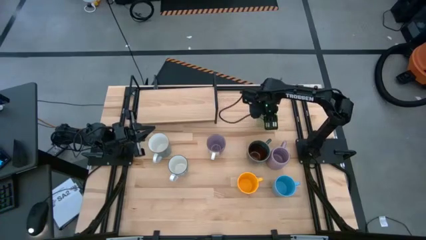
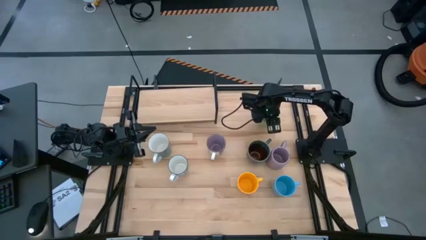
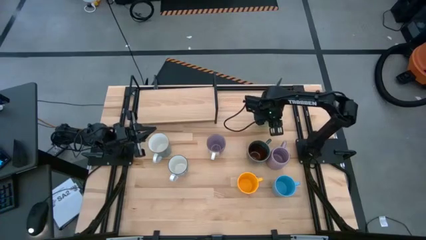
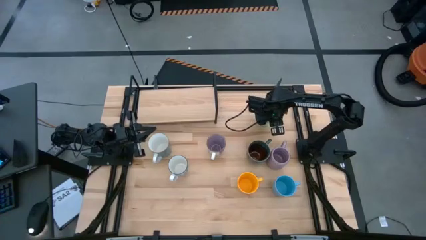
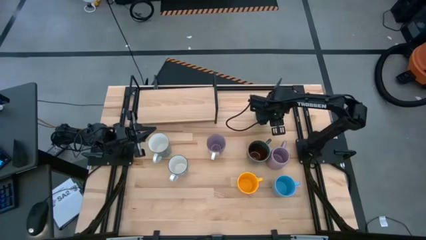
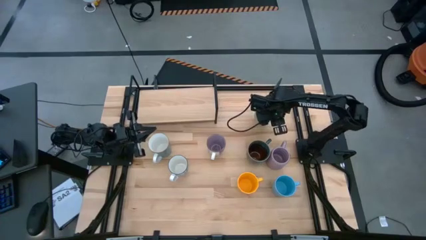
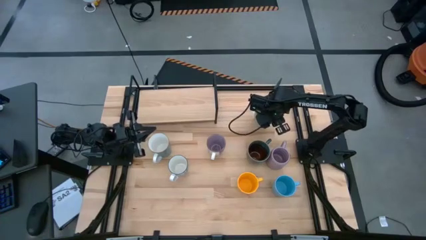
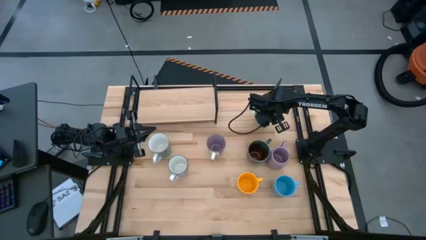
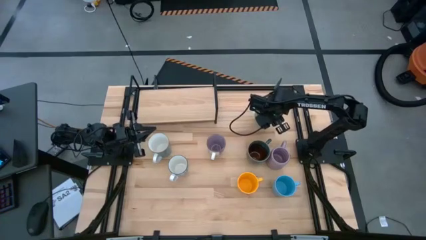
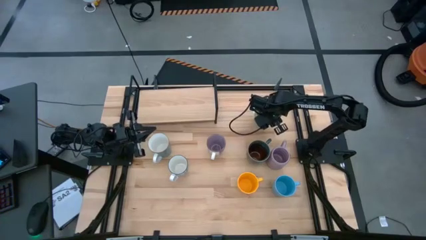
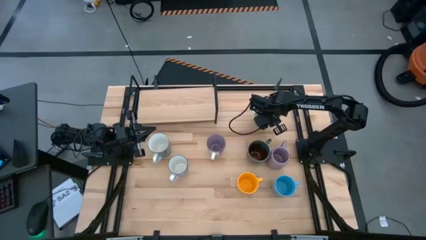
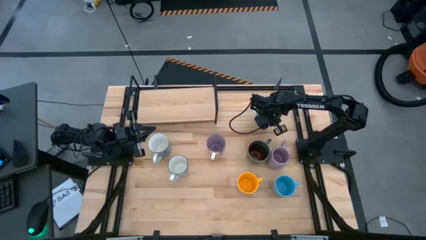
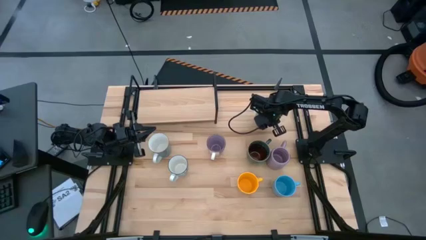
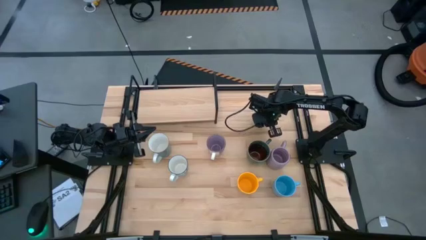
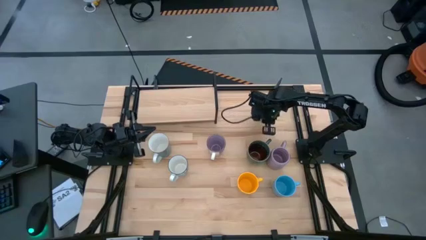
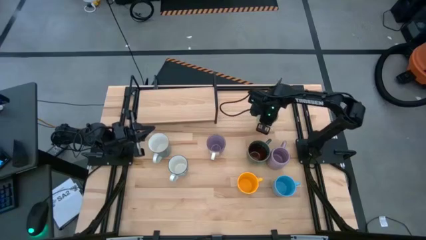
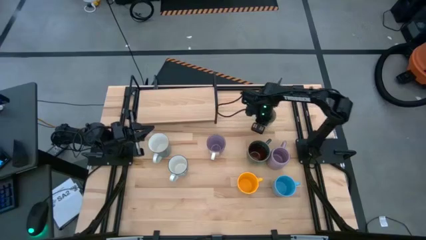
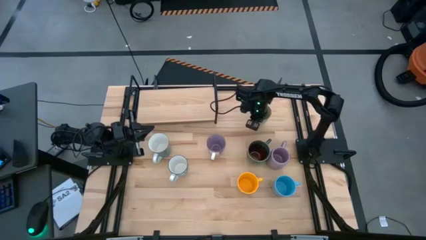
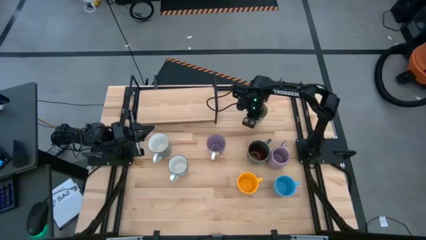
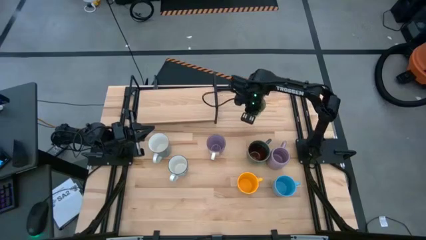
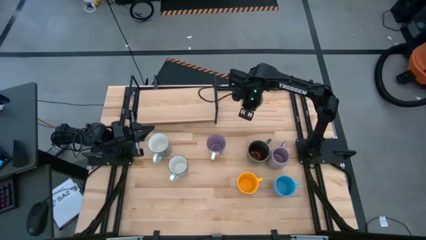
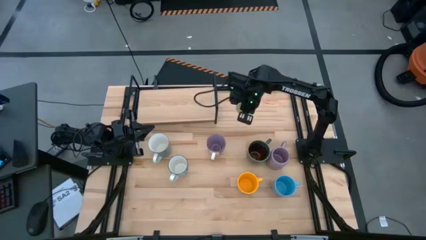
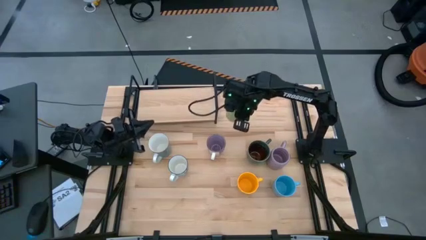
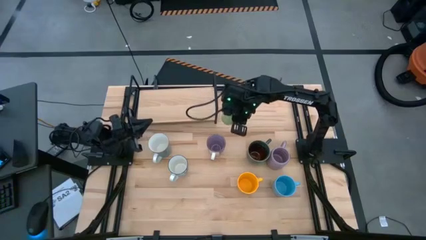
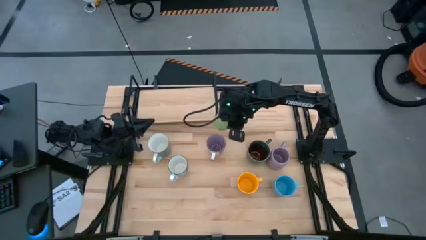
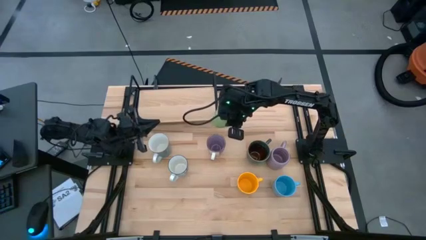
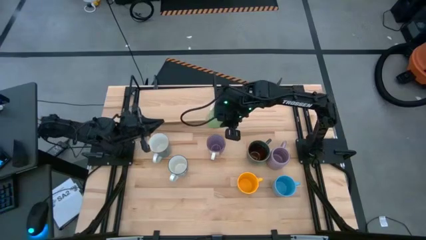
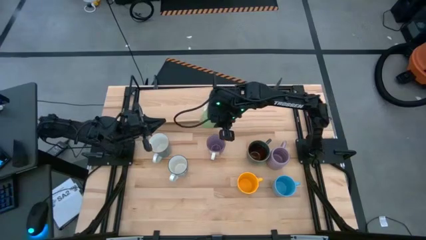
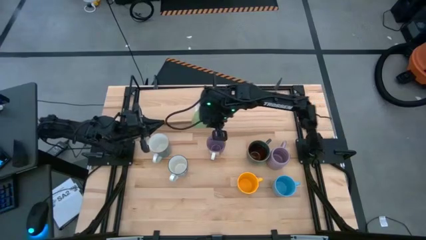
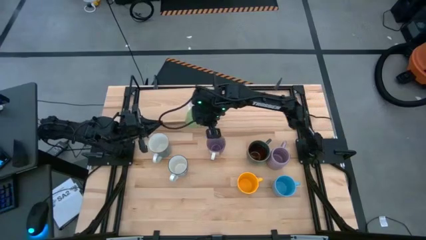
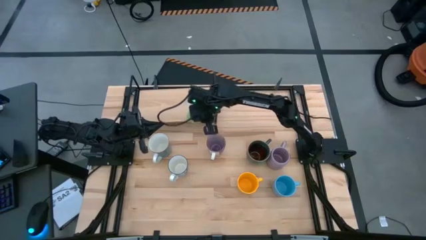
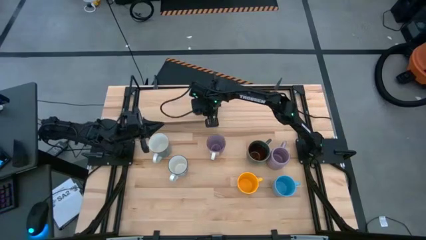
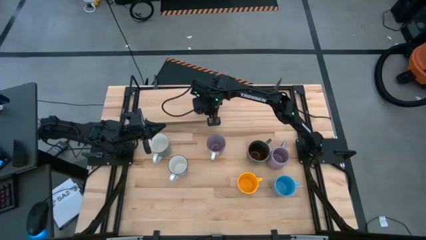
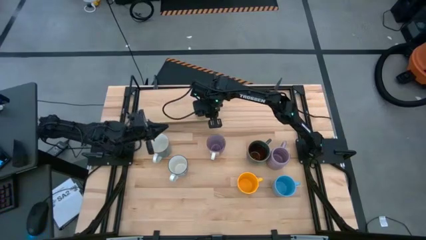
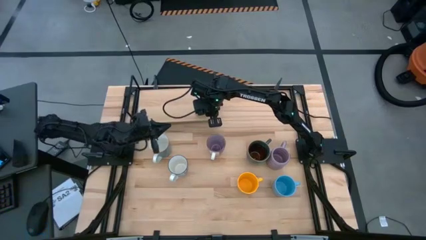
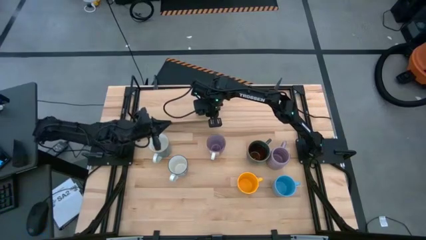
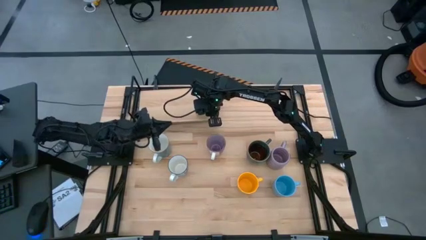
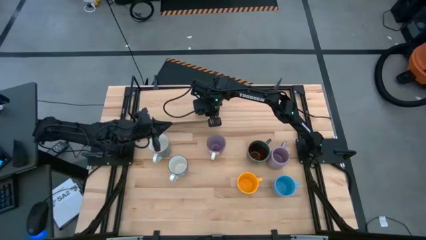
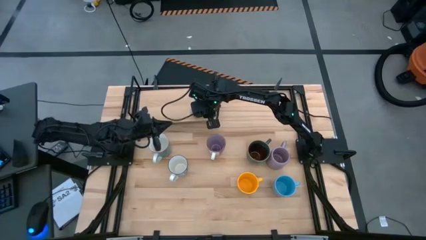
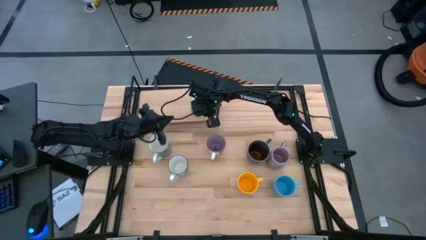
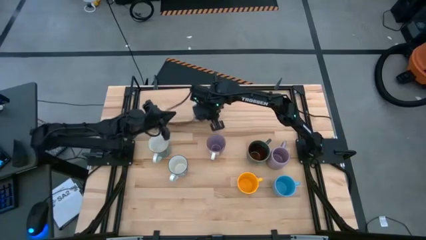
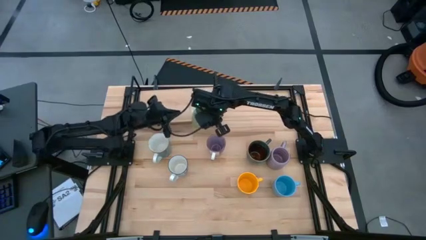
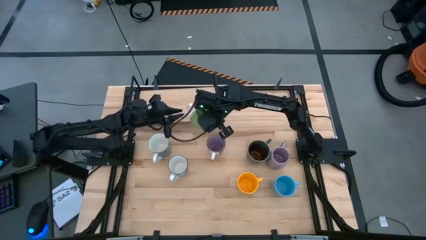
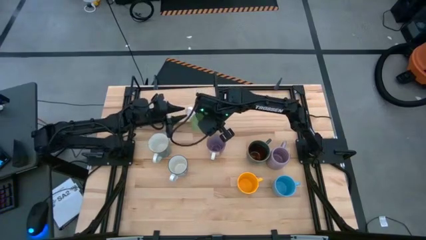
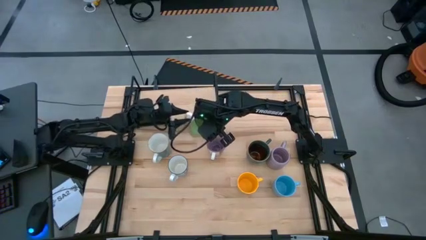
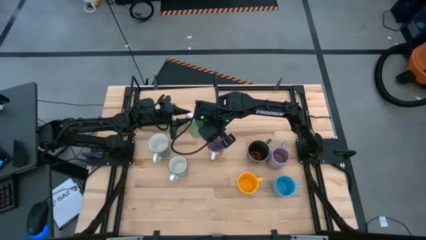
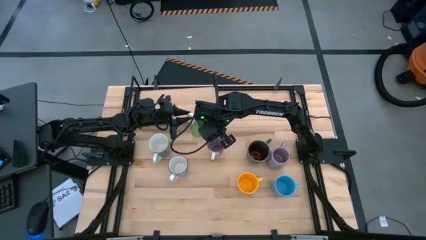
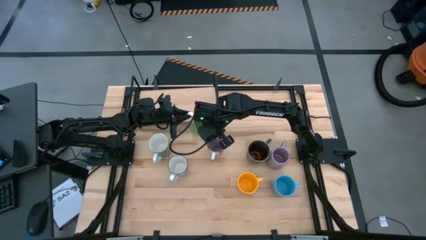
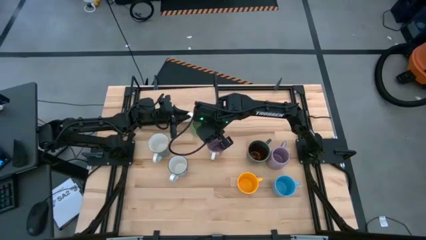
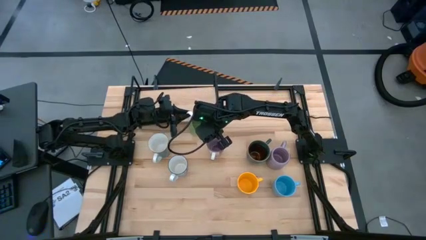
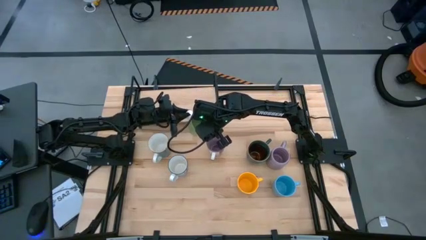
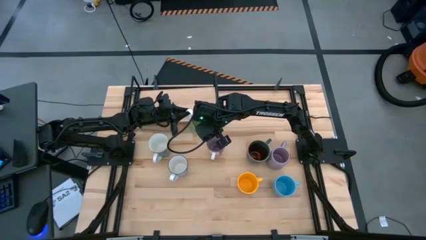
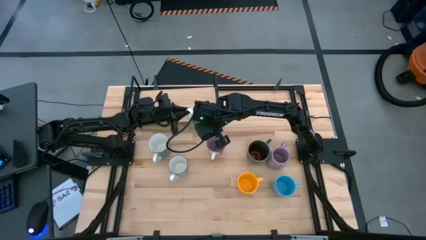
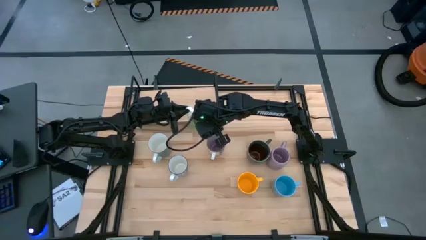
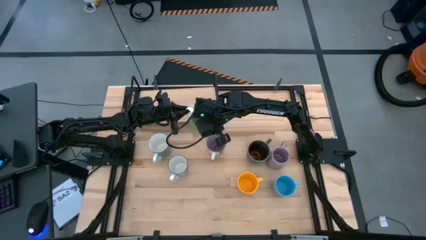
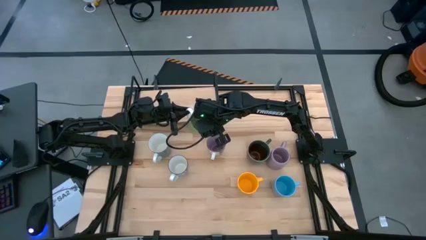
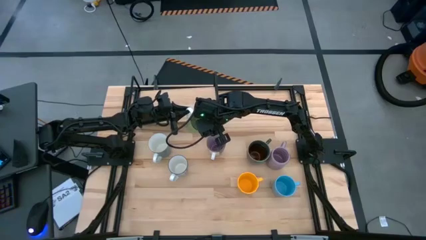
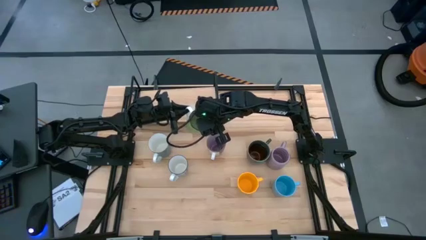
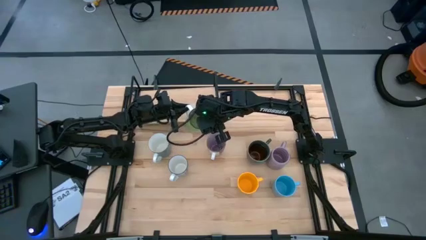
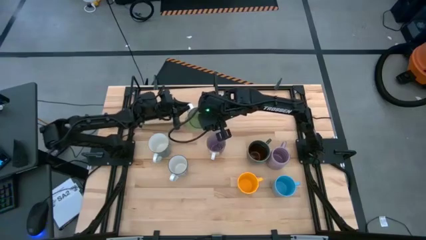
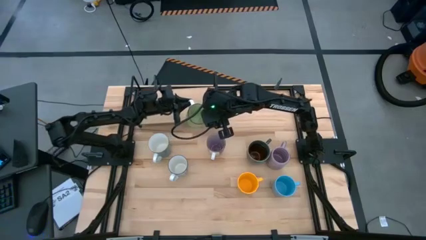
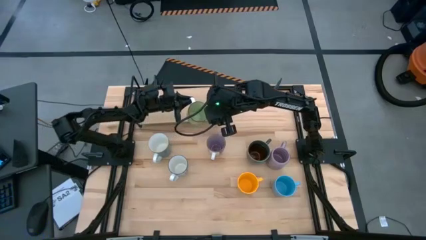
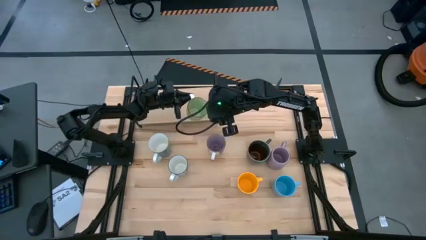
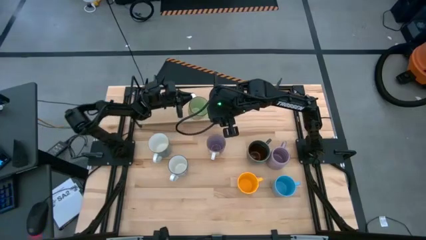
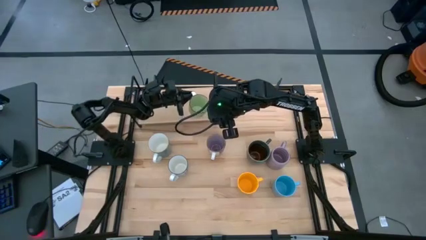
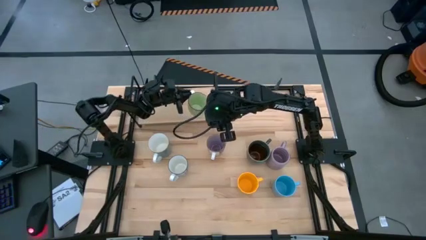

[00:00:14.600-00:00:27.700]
Task: Place coffee mugs
Put the green patterned mug on the shelf

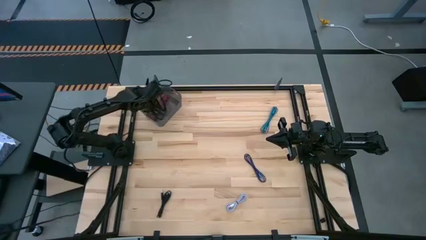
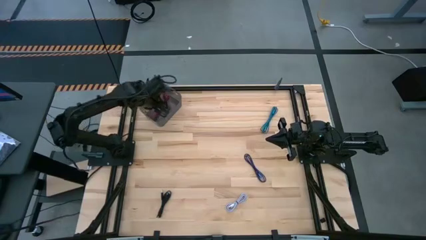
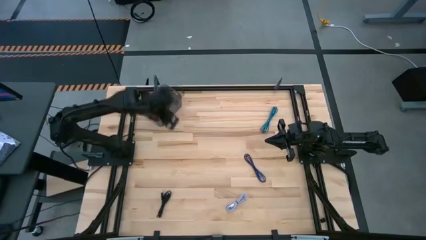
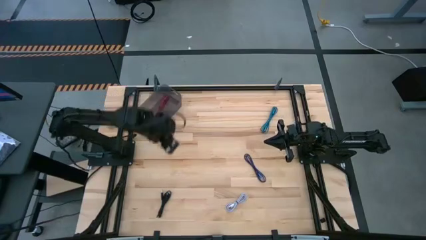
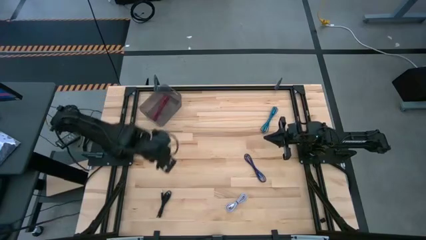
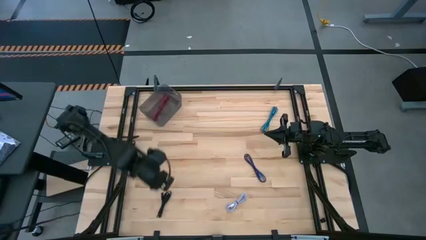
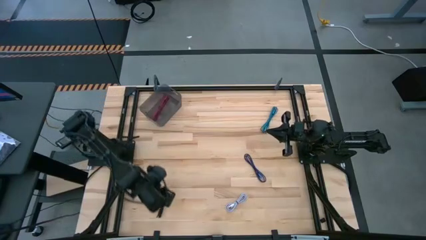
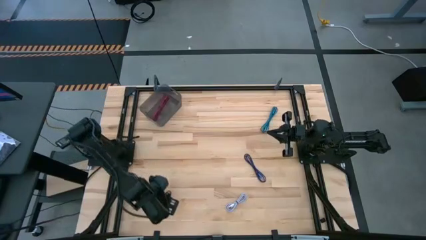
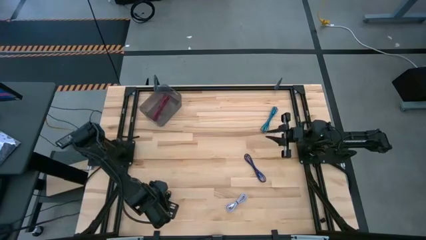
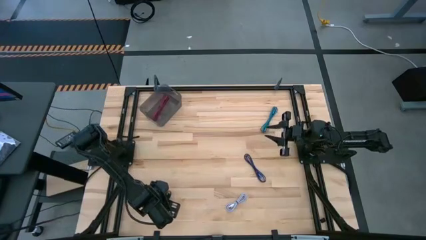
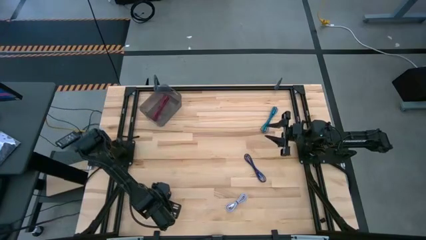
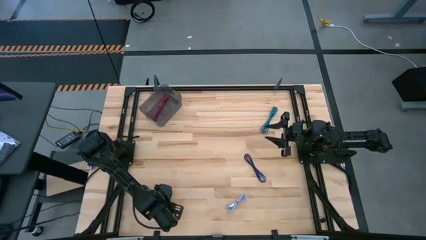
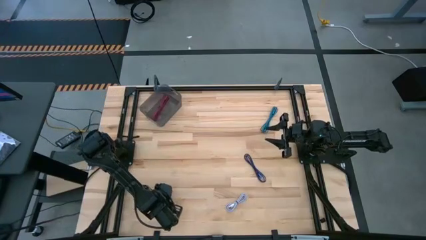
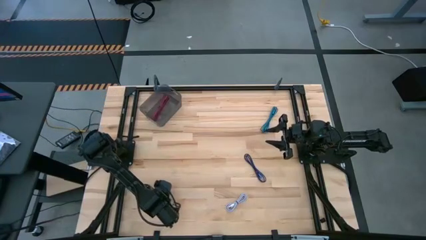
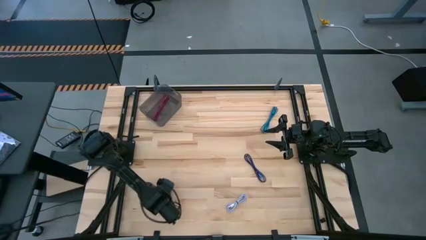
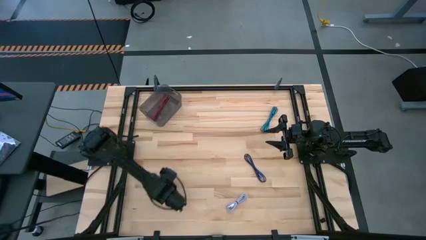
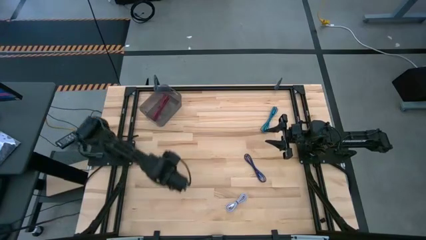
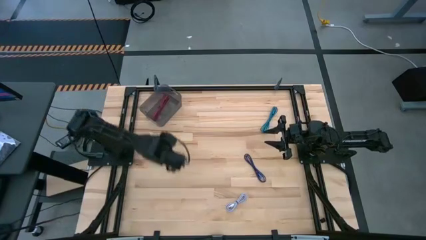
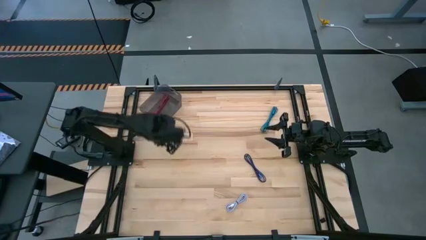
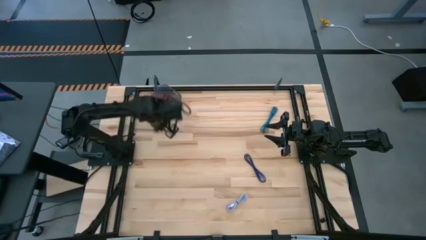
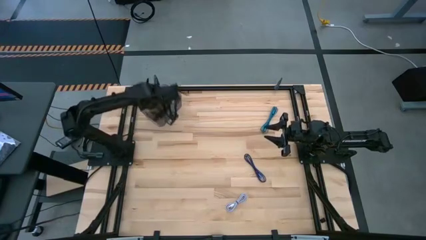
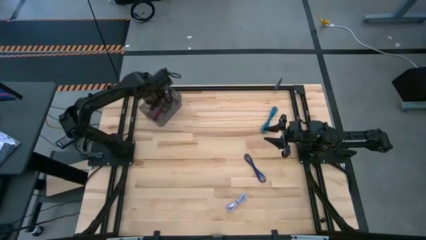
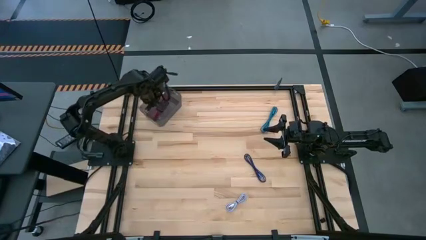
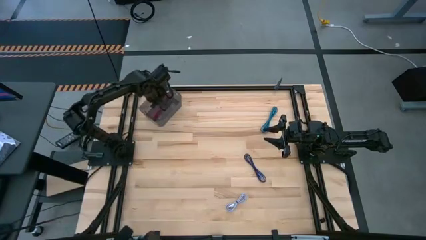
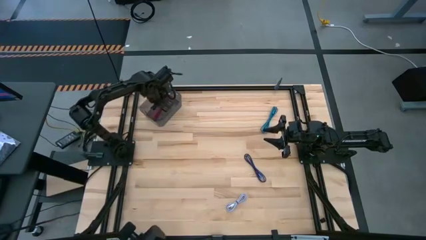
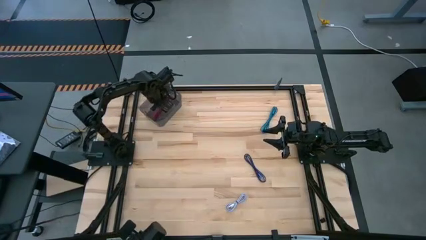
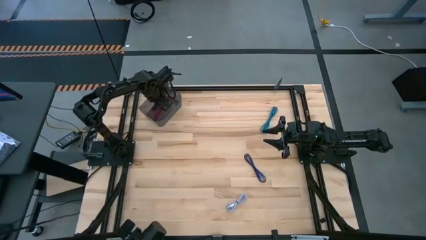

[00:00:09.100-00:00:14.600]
Task: Pick and place USB-C Cables
Put the black USB cable into the black bin
